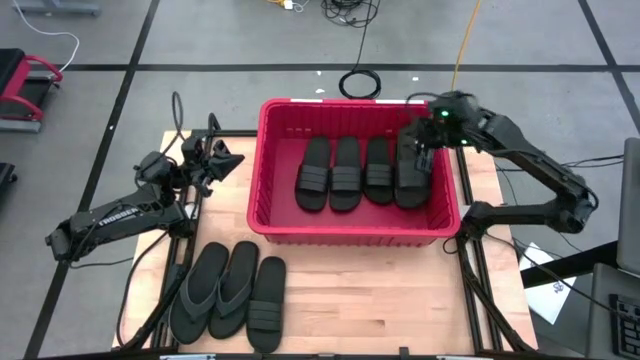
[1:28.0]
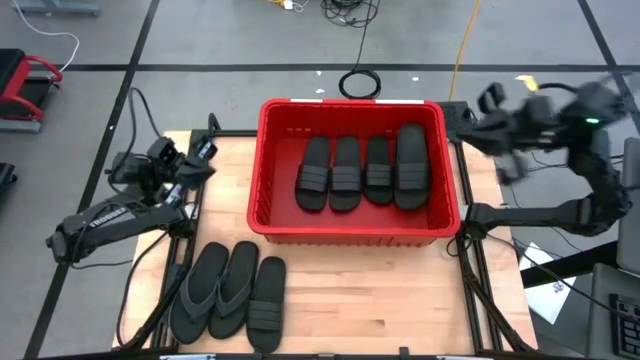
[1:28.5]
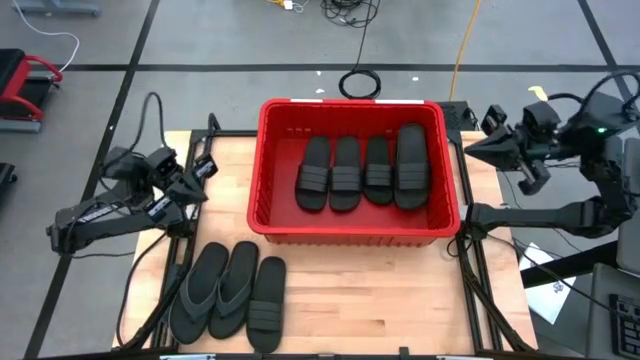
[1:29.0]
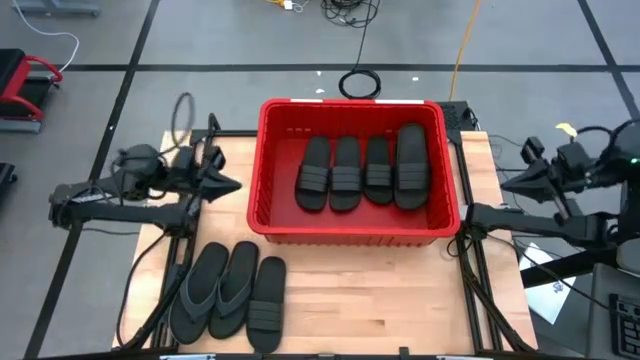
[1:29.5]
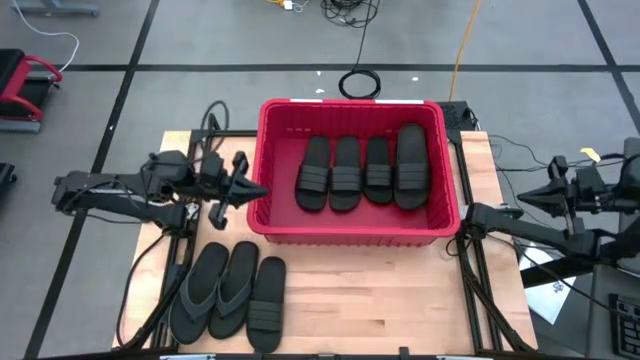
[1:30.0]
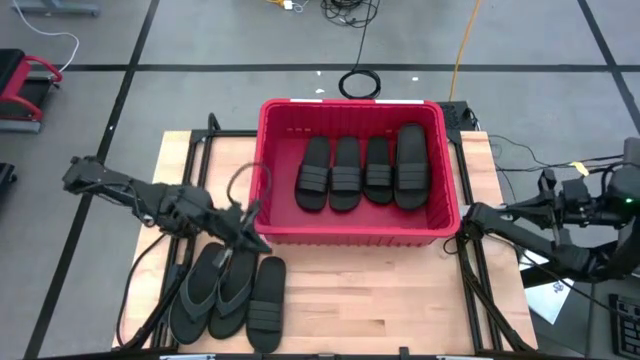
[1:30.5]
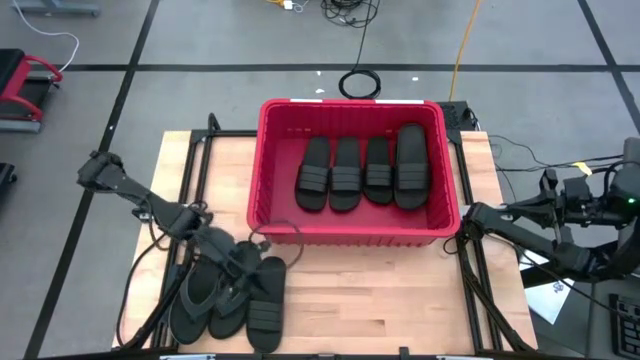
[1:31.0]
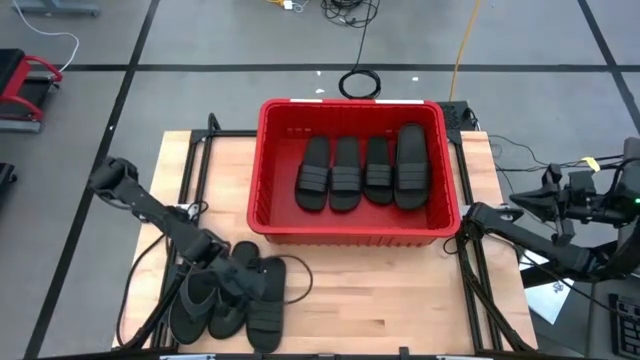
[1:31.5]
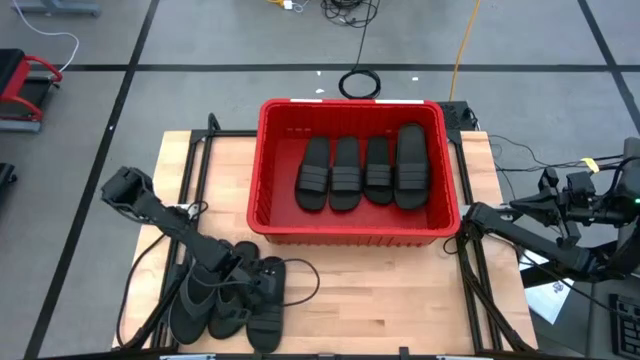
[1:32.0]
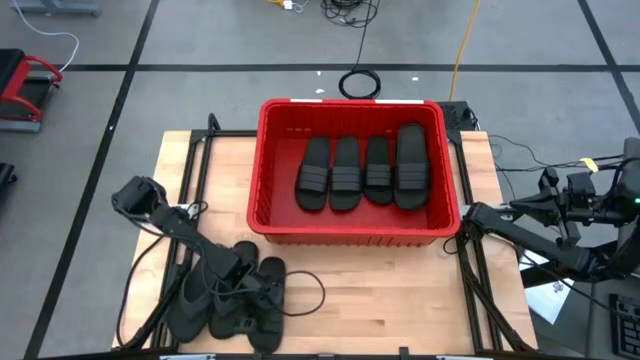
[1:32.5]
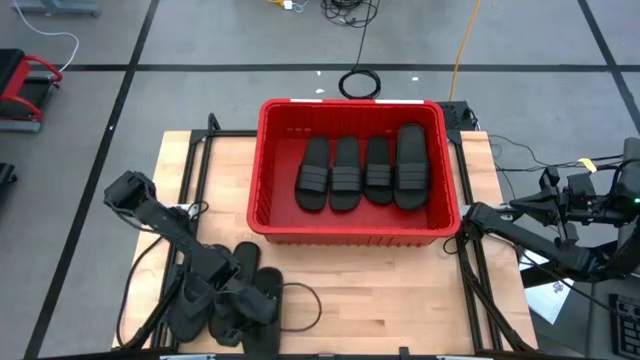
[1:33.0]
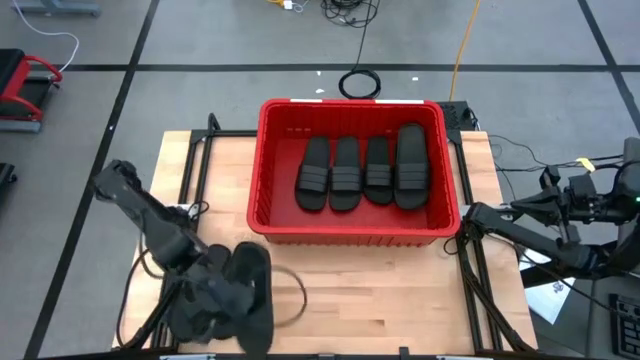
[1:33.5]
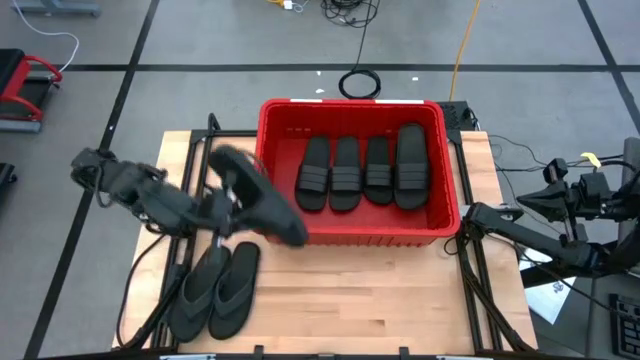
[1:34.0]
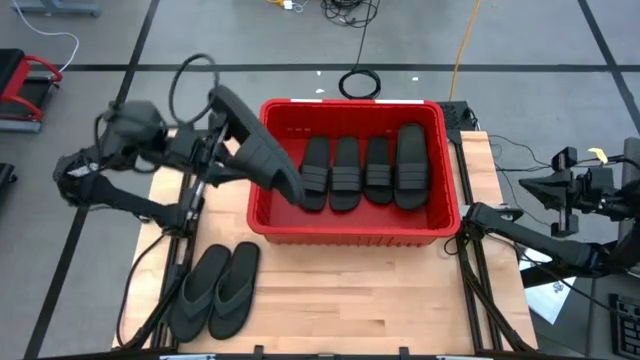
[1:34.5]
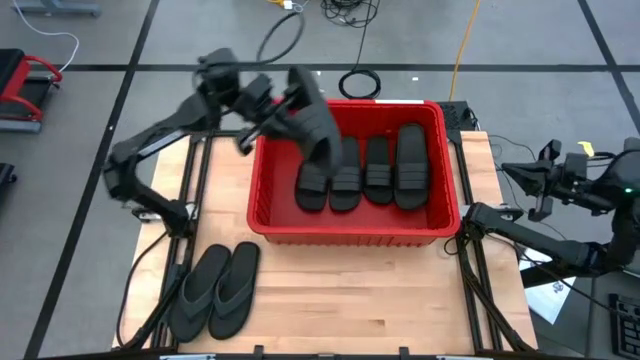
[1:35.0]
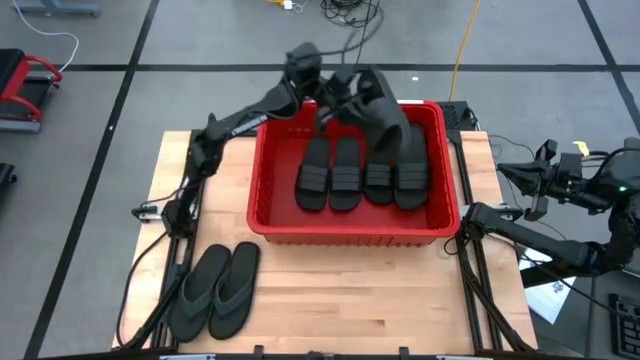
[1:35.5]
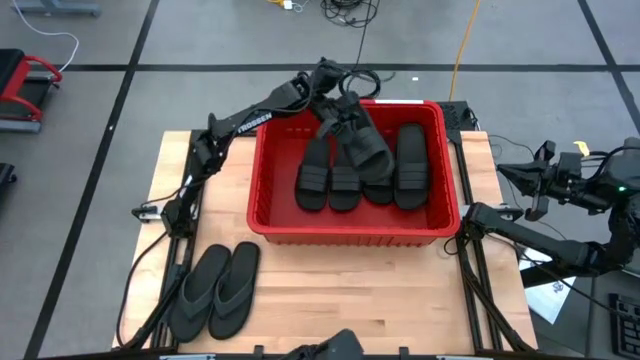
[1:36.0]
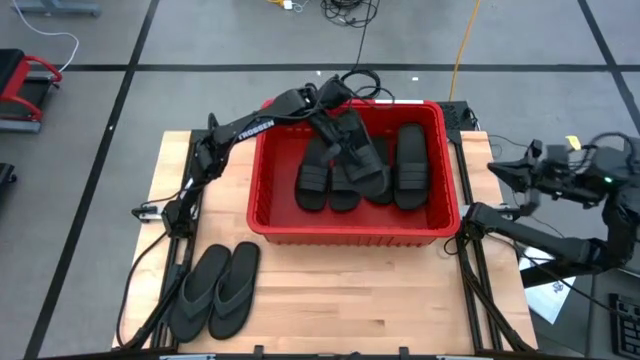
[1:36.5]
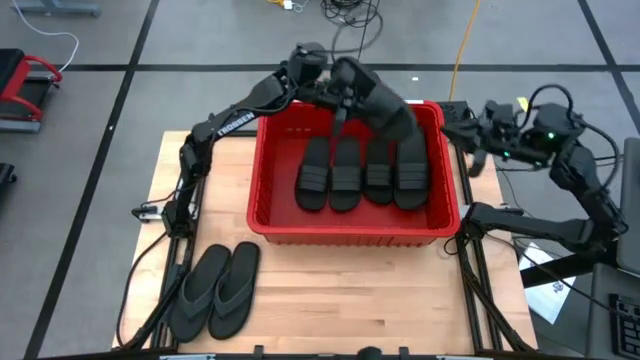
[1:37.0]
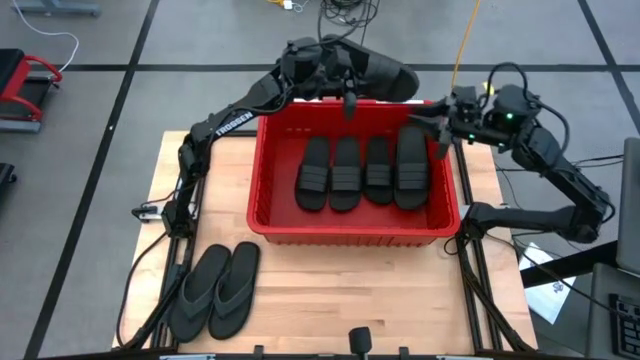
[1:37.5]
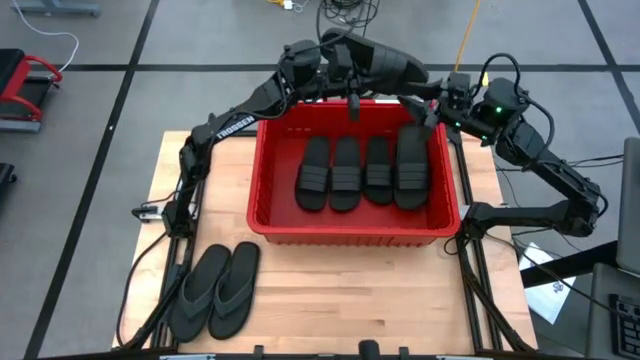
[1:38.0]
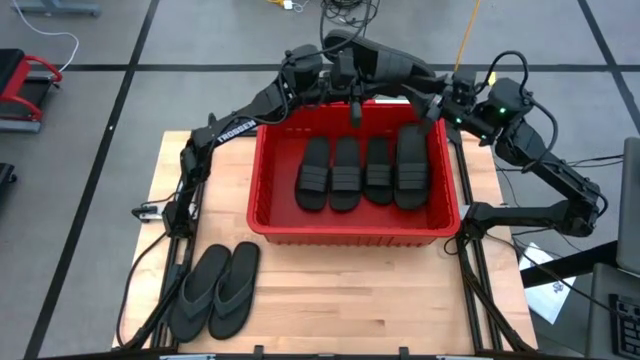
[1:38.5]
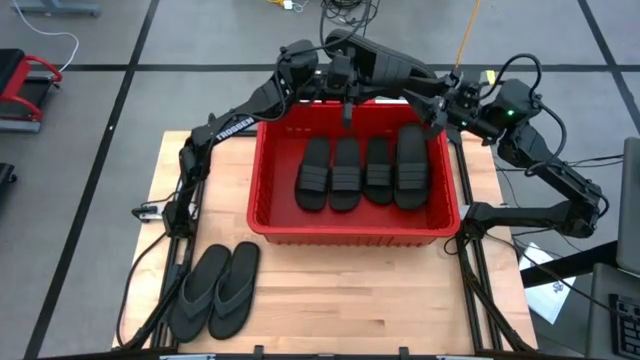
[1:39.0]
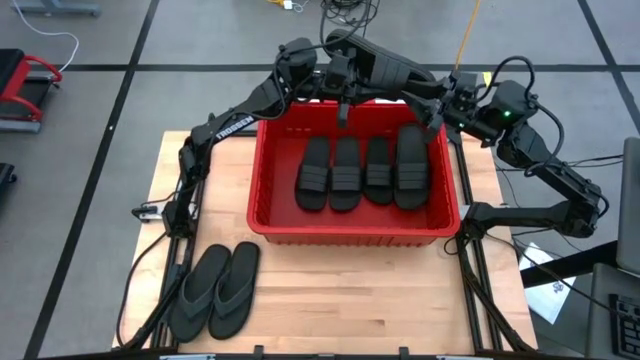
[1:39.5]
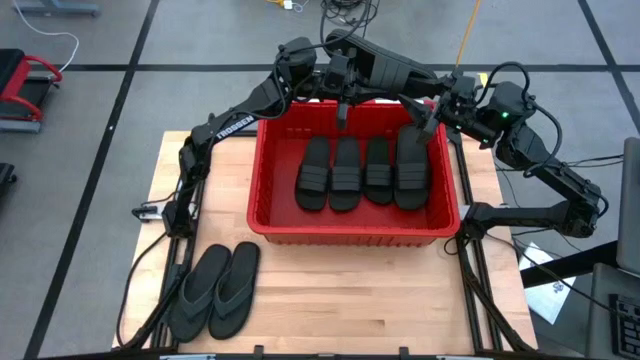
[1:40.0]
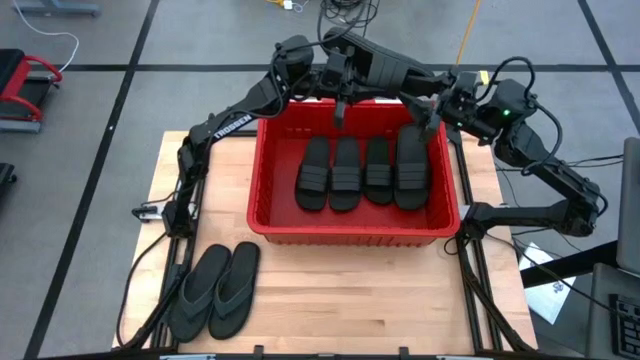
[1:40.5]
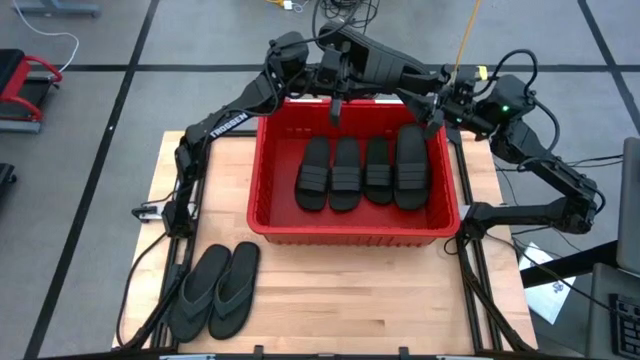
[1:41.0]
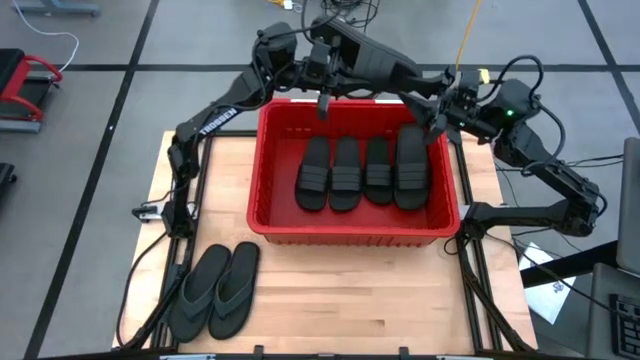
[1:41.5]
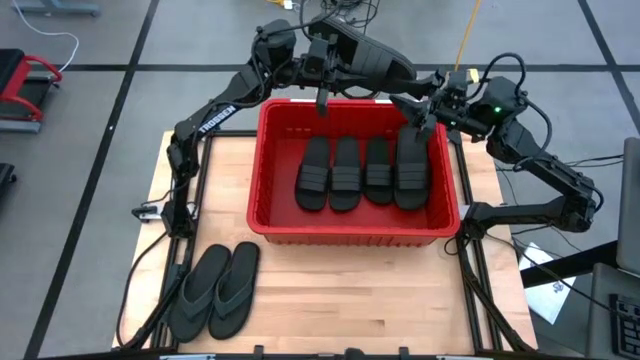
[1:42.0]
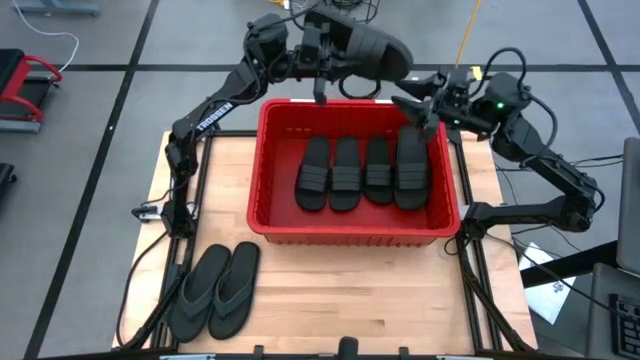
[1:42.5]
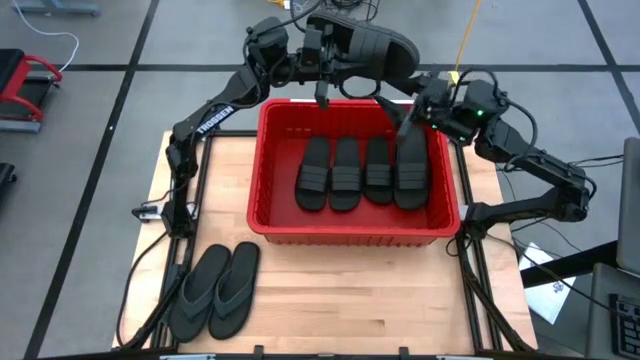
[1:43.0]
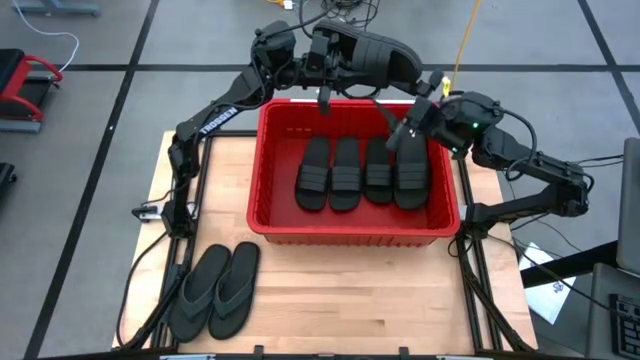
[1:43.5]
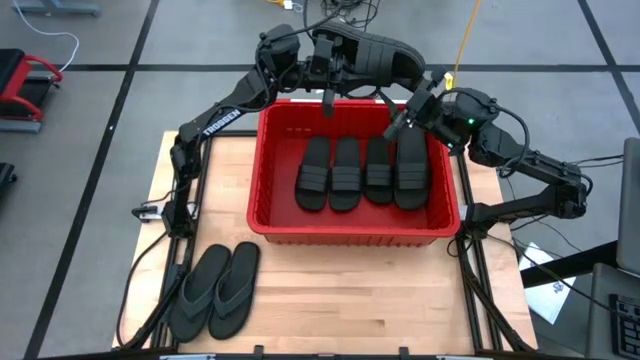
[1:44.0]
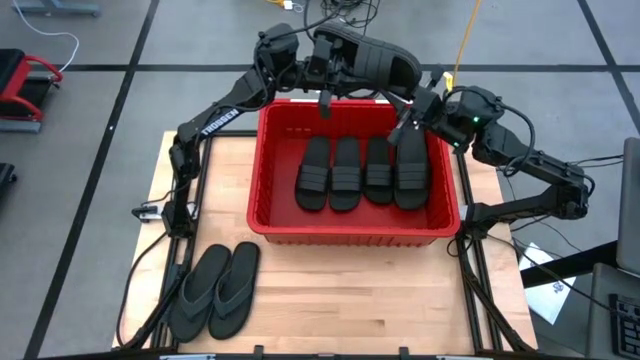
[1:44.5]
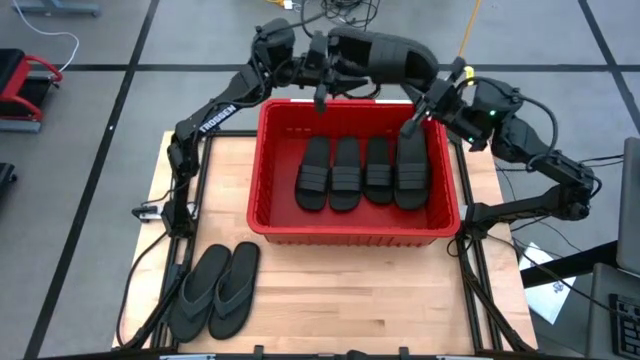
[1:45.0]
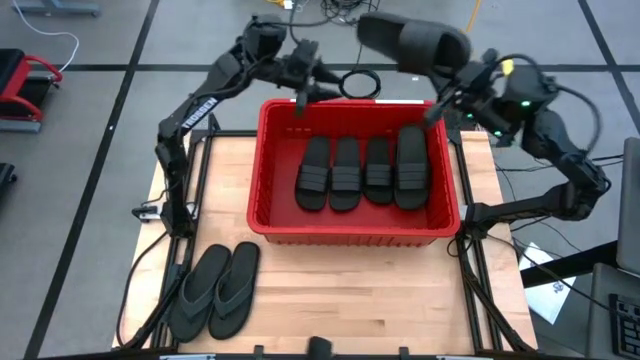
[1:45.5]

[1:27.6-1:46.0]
Task: Pick and place slides into bin
Put the black slide into the red bin

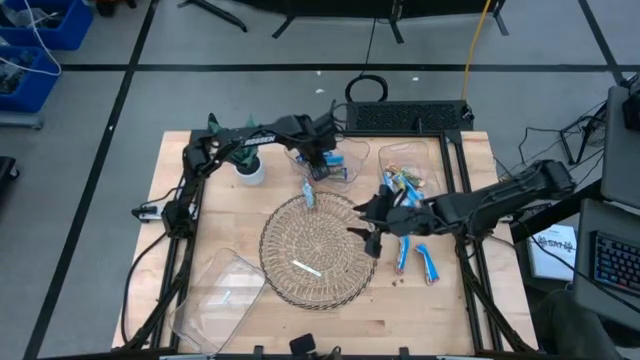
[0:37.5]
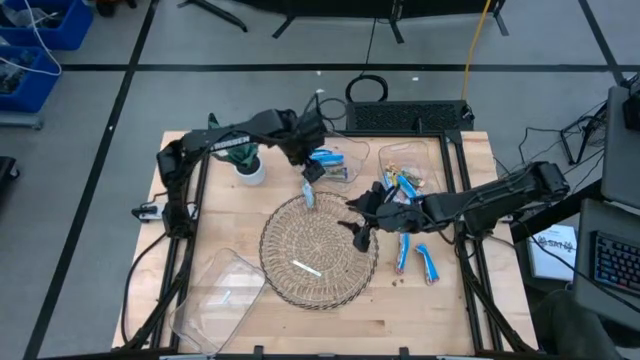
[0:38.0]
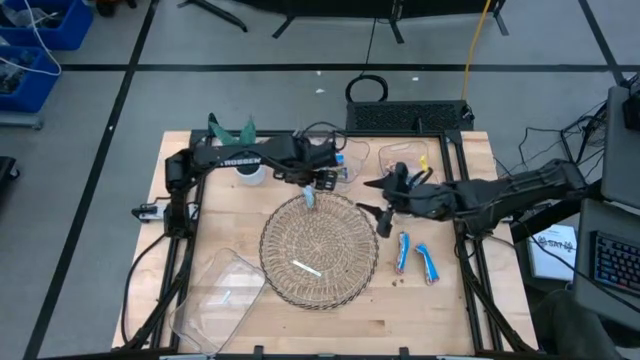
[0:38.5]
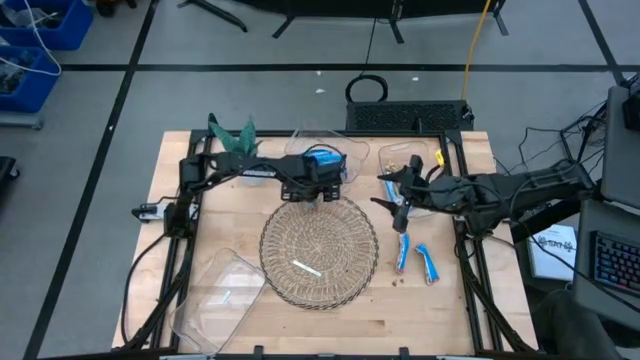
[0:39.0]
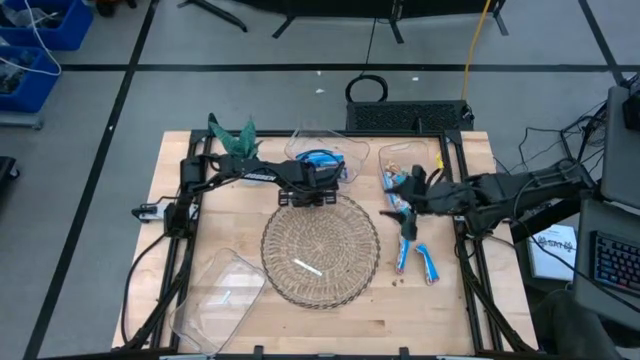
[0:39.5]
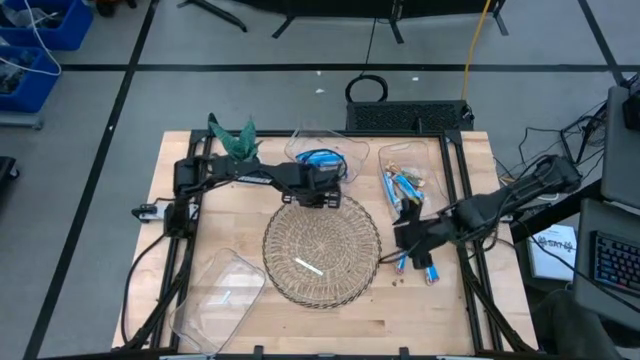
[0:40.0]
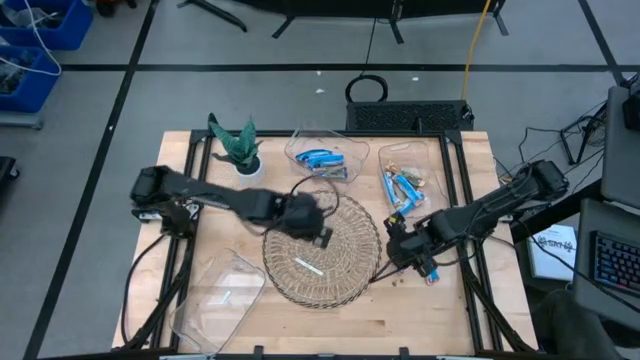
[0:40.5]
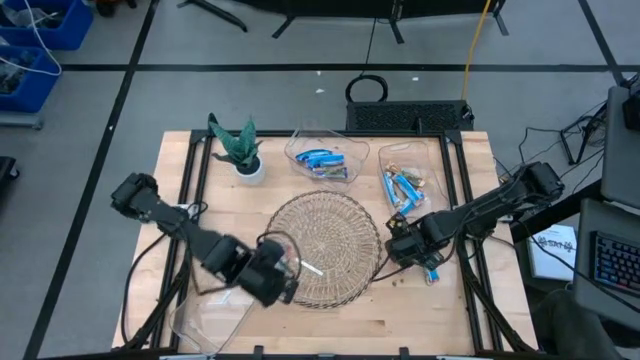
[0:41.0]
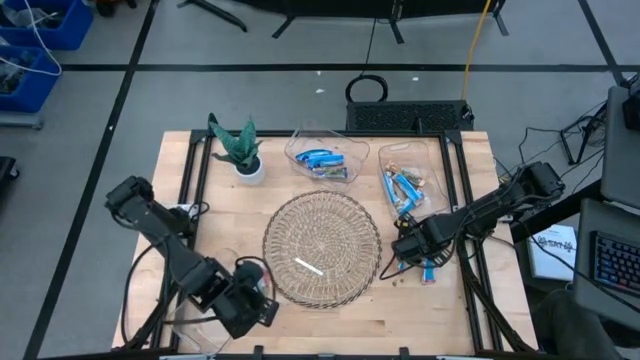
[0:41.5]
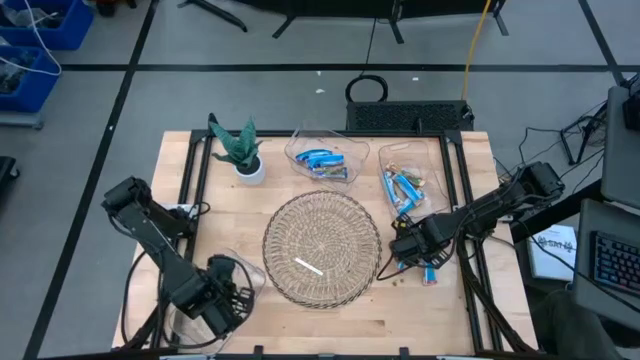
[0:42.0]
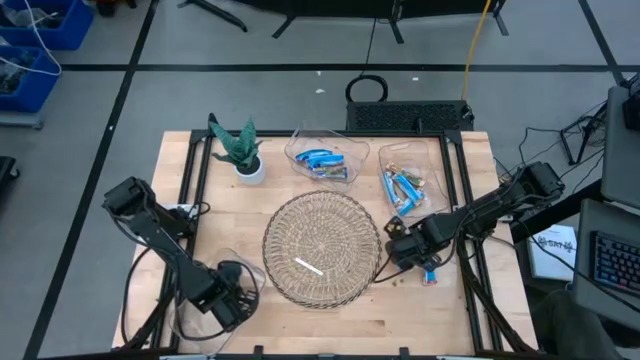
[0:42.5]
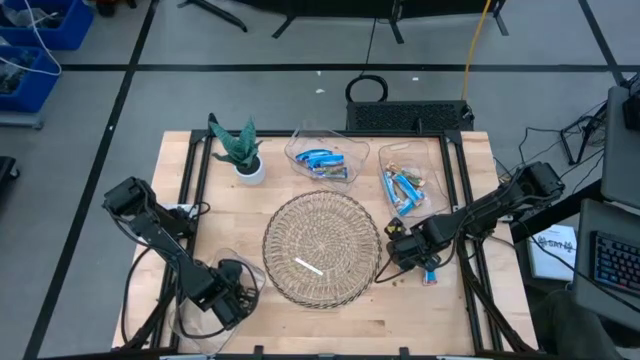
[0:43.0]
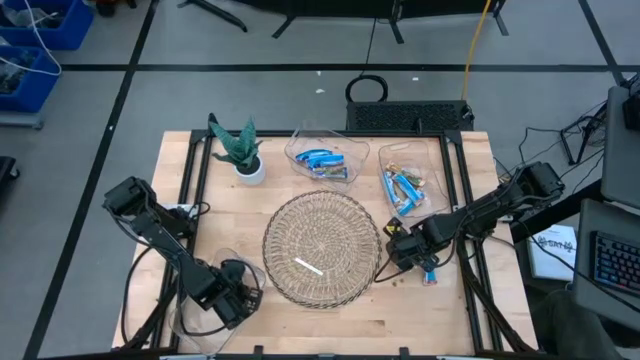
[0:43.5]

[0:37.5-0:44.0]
Task: Pick and place Granola Bars by type
Put the top red granola bar into the bottom transparent bin
